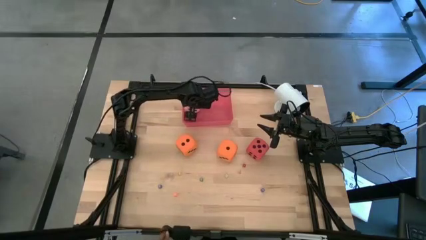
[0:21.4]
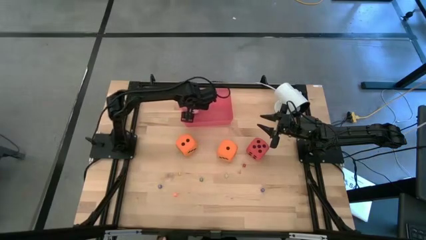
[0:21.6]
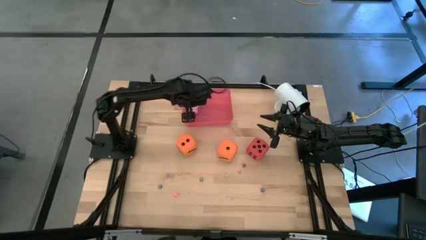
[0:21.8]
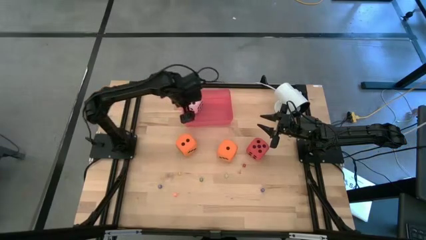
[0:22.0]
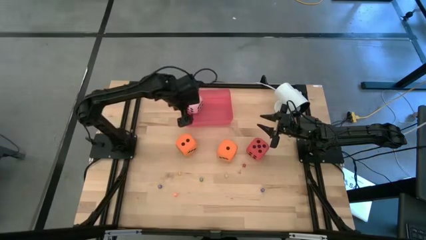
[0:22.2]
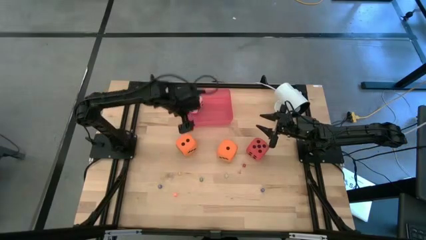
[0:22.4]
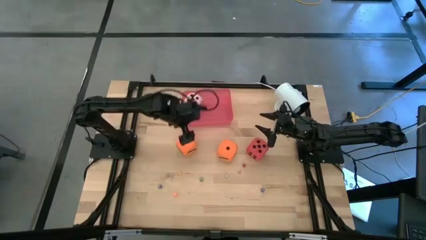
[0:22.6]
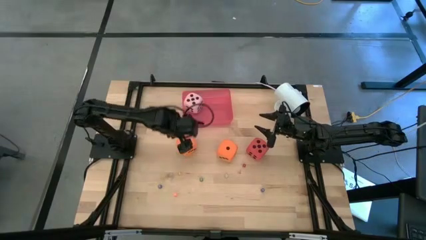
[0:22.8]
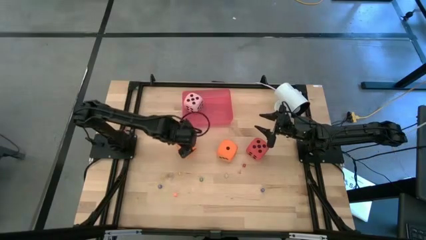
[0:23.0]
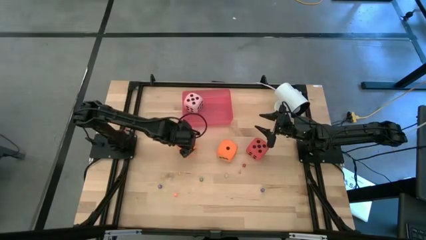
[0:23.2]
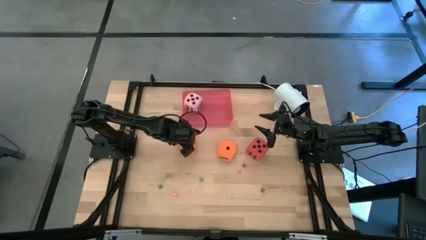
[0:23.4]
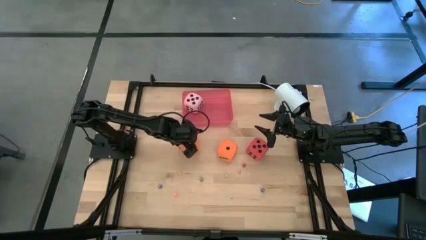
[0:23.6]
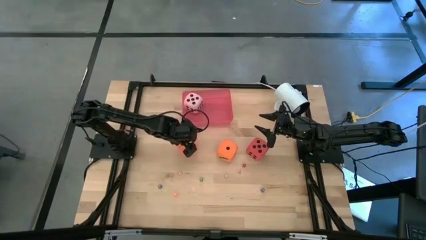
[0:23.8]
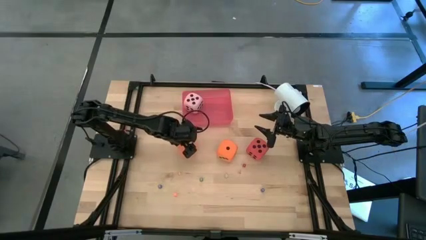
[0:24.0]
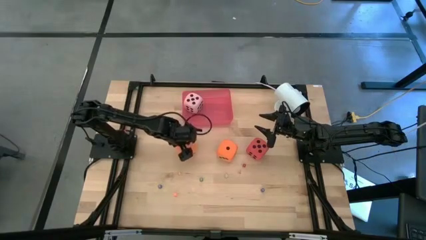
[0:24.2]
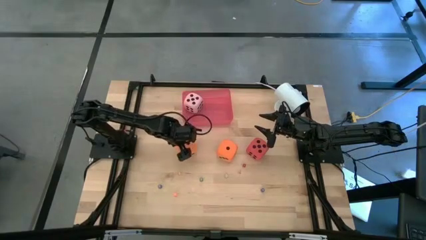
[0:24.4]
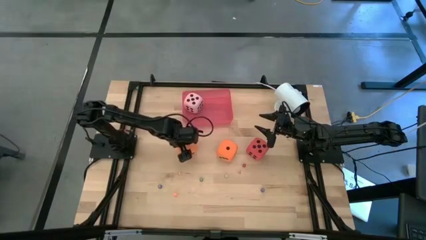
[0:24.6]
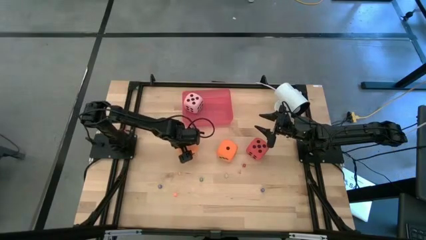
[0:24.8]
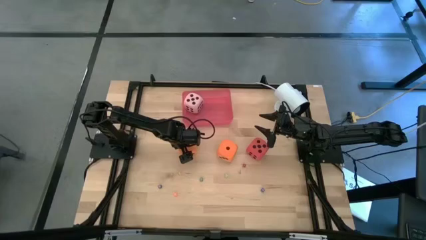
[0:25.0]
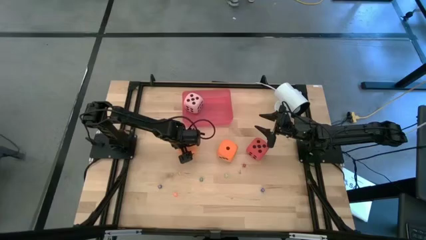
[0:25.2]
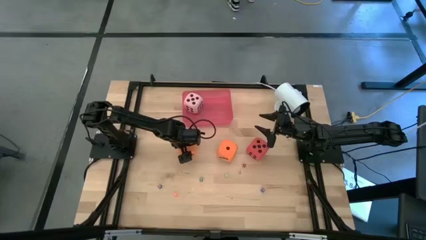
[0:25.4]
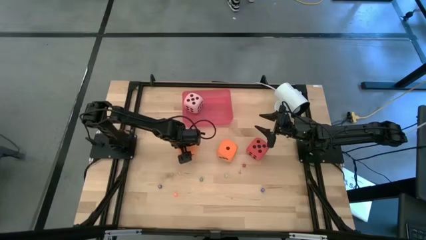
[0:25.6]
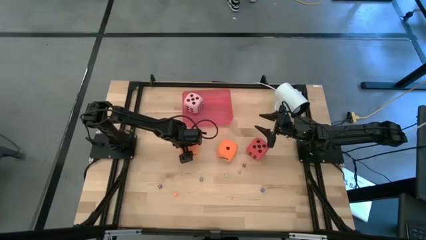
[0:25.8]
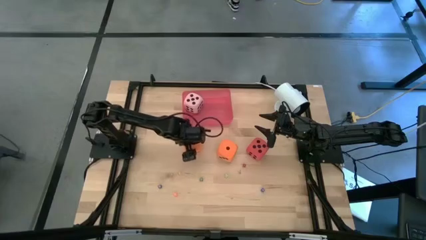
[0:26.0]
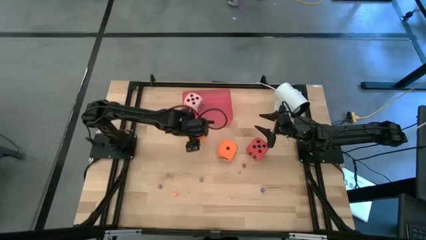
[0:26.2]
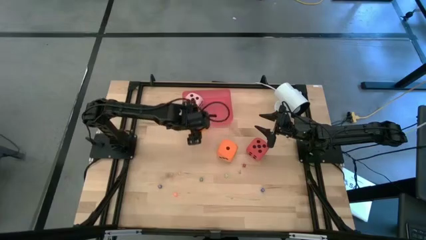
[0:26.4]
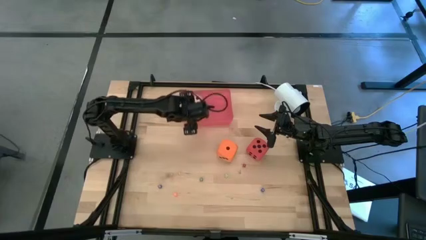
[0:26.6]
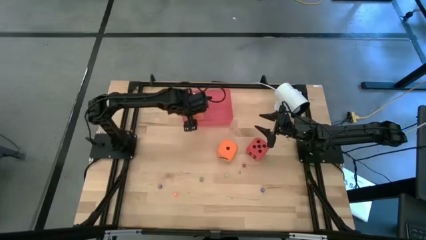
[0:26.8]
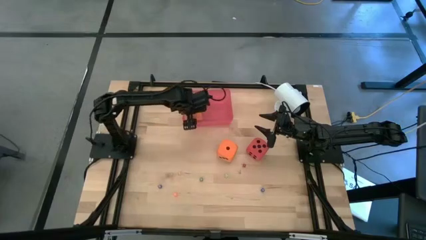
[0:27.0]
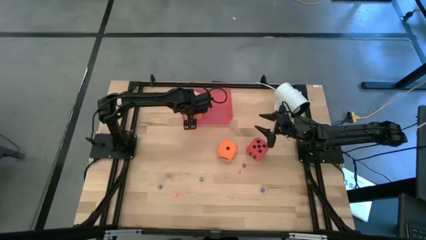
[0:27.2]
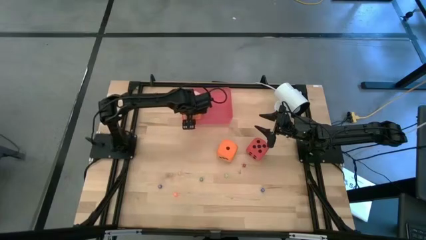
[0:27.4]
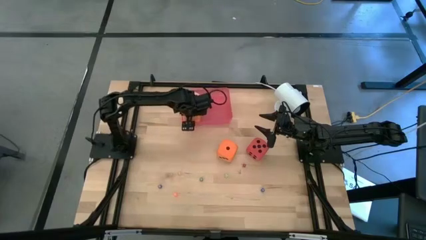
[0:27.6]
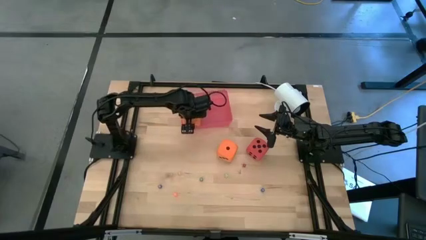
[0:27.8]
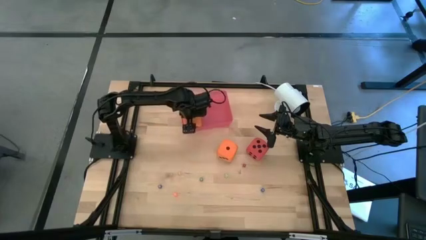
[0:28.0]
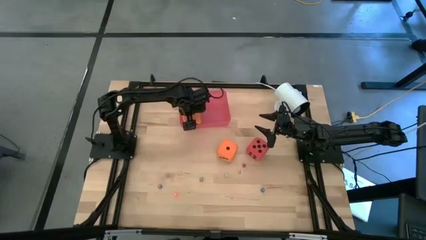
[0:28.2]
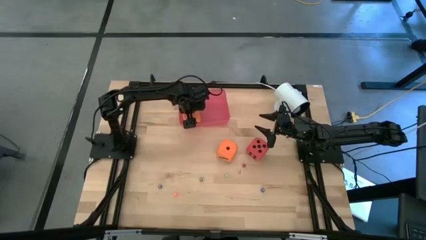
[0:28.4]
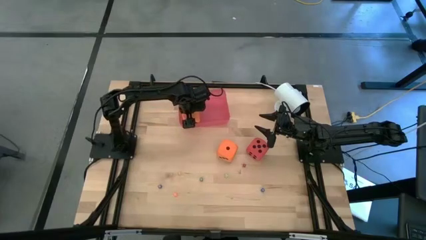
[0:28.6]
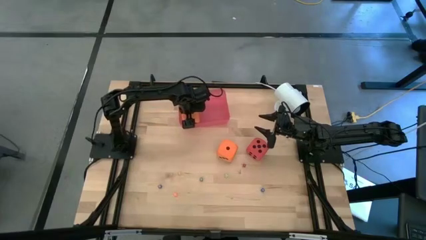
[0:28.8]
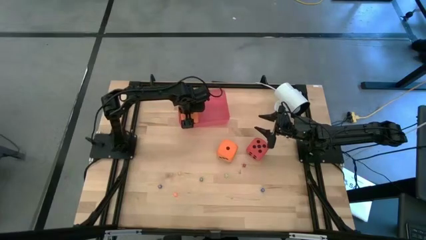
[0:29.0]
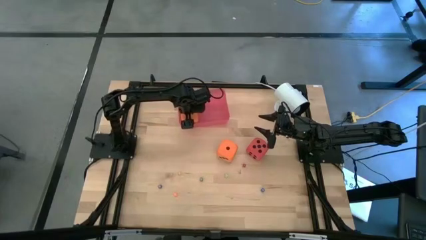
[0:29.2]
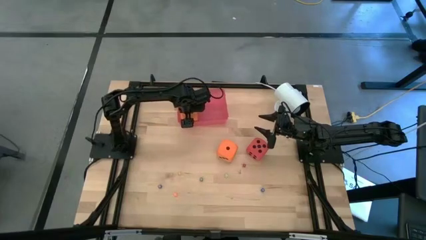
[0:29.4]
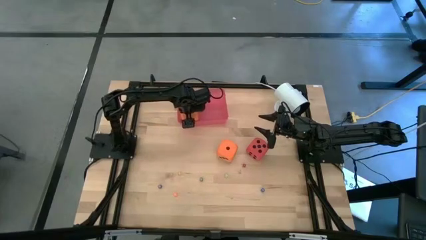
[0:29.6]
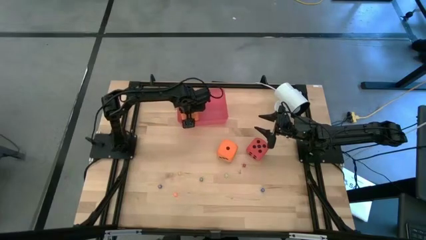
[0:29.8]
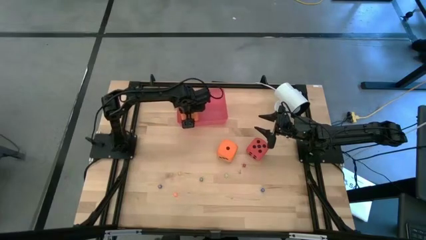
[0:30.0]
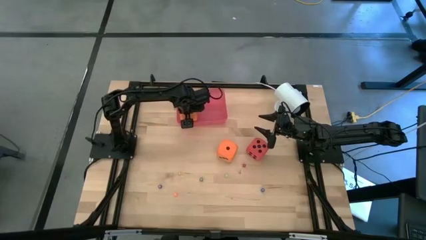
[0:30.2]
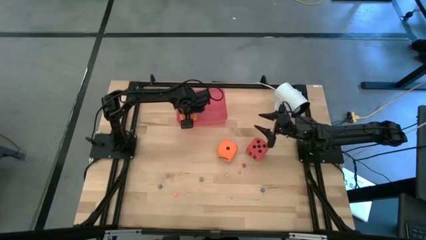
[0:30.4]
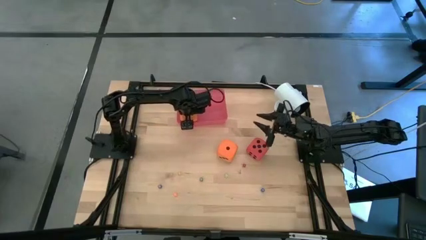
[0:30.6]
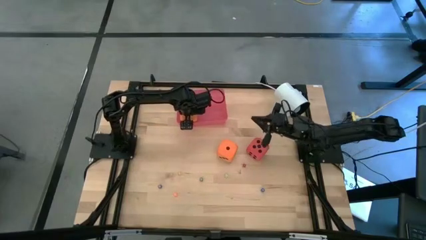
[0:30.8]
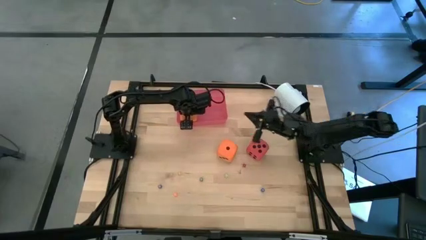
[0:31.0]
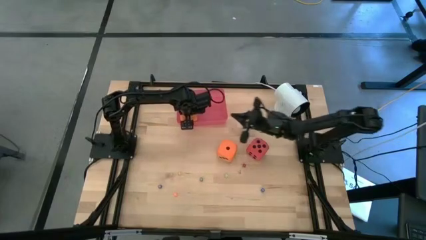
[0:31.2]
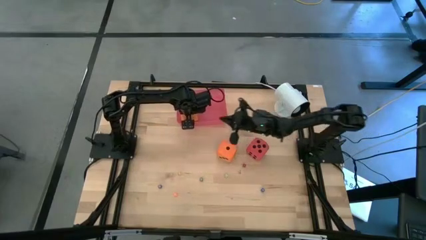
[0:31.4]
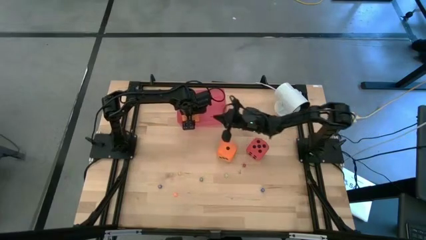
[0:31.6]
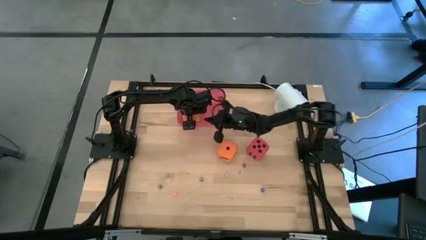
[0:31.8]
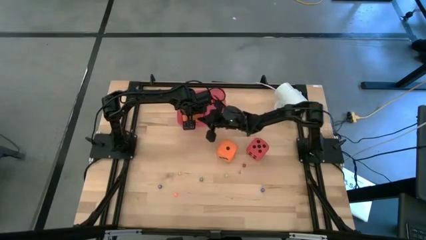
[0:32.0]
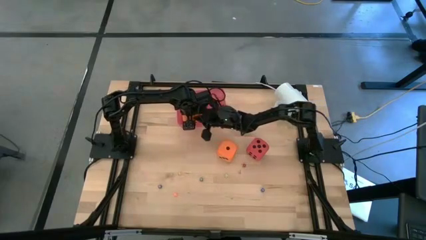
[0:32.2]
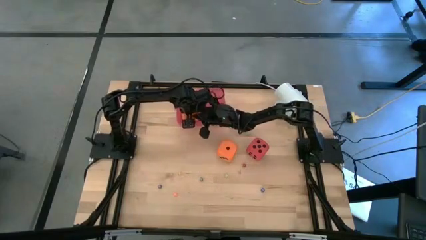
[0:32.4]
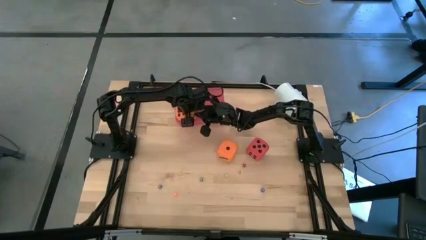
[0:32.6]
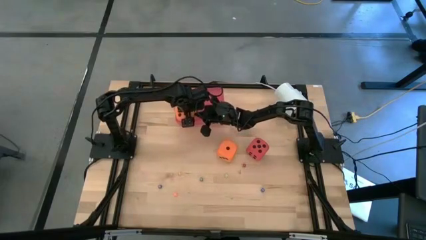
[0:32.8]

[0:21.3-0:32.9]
Task: Pick & Place Dice
Put the left large orange die into the red bin
